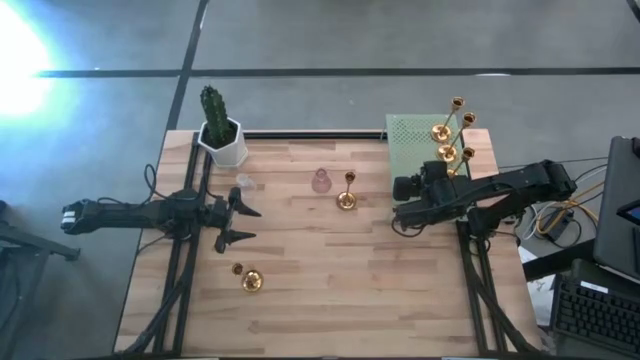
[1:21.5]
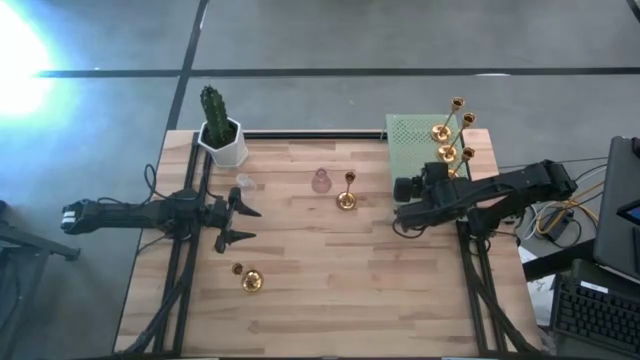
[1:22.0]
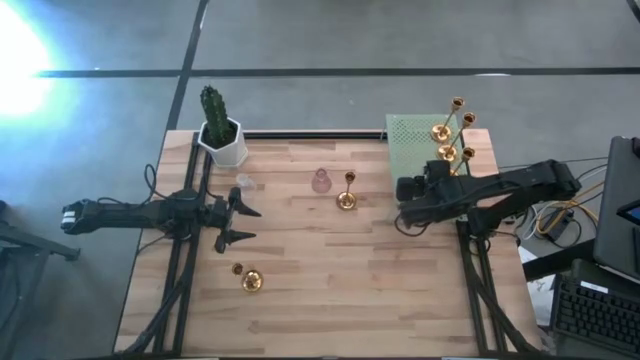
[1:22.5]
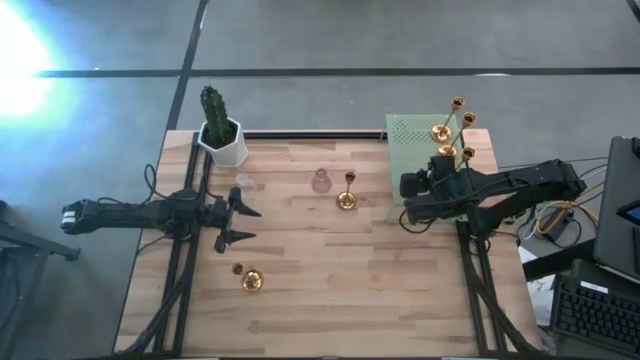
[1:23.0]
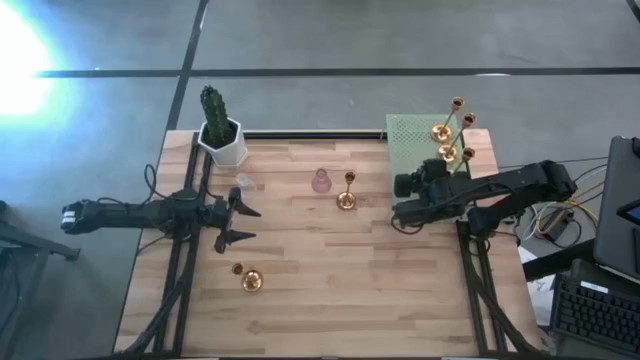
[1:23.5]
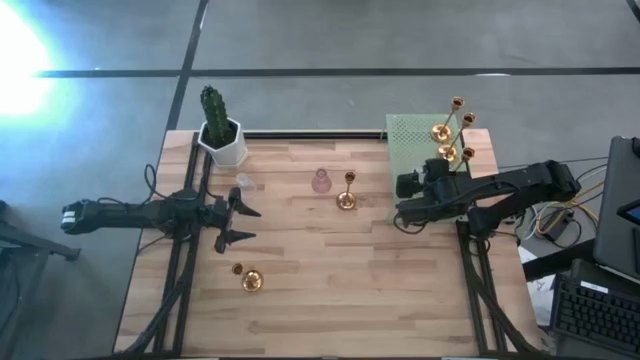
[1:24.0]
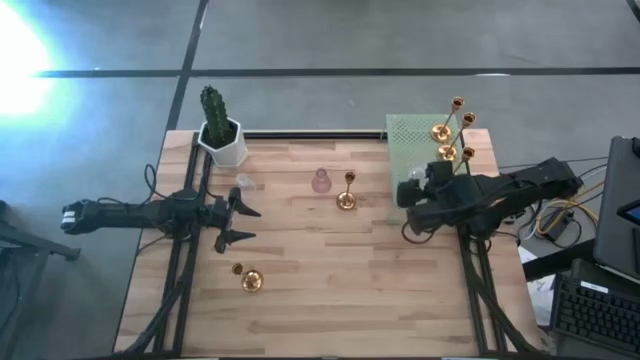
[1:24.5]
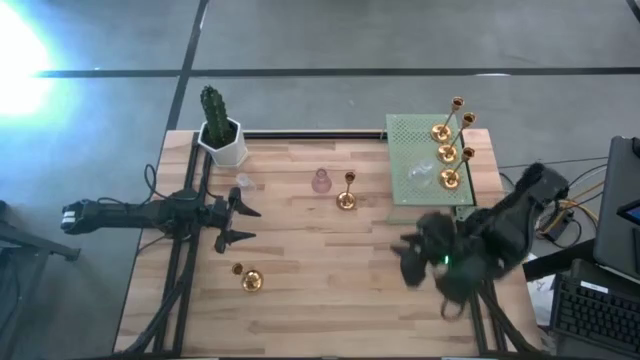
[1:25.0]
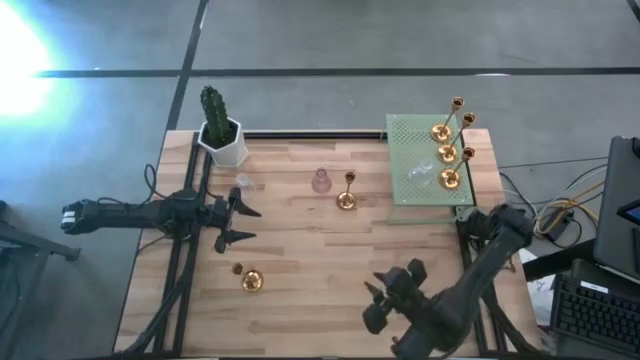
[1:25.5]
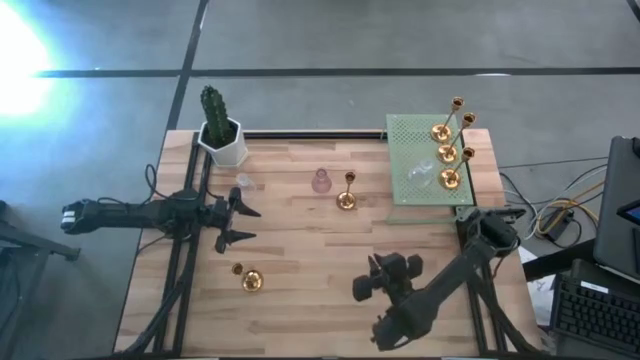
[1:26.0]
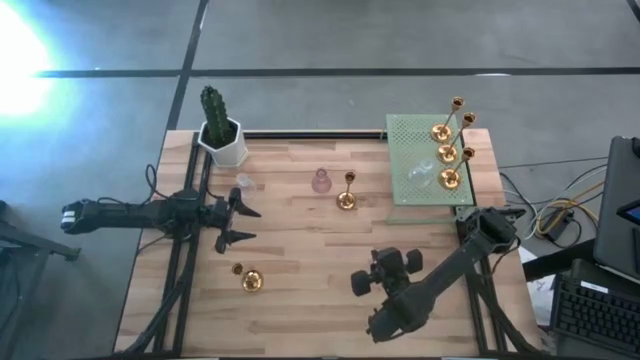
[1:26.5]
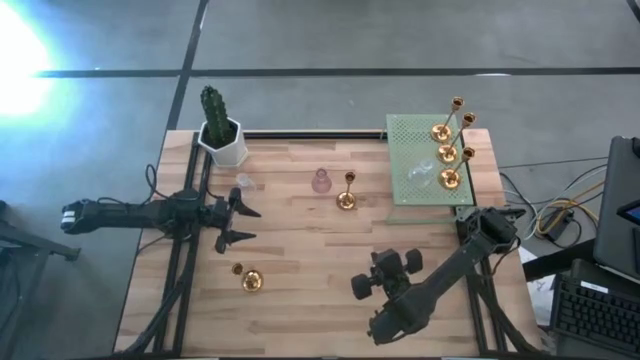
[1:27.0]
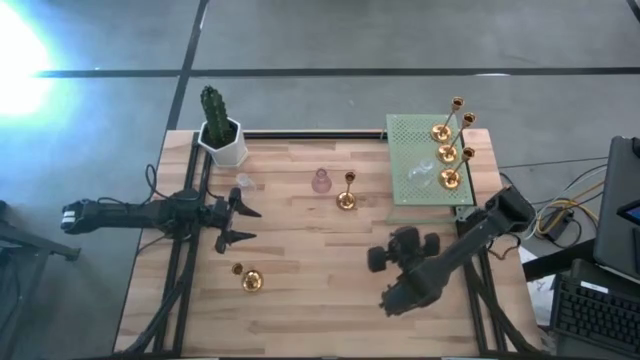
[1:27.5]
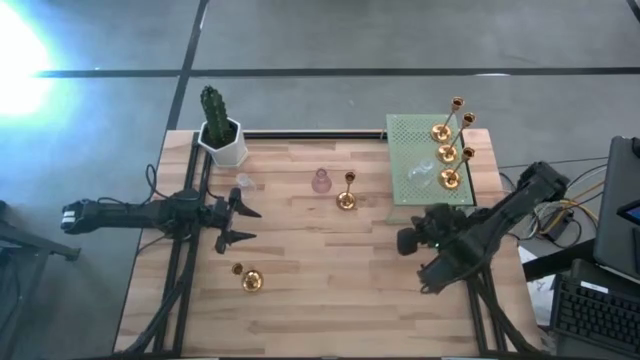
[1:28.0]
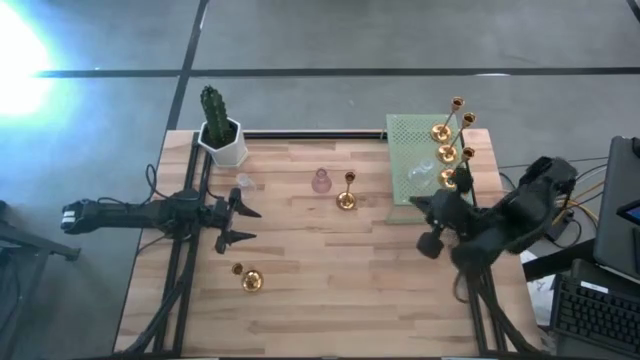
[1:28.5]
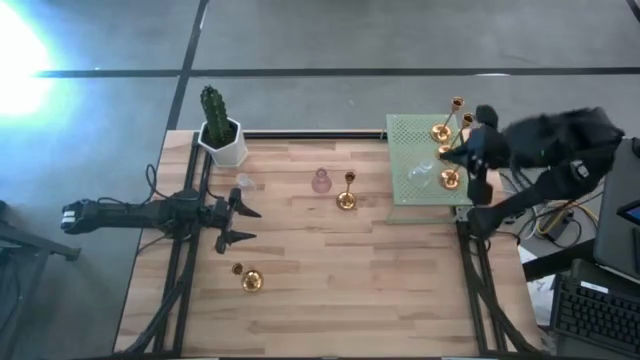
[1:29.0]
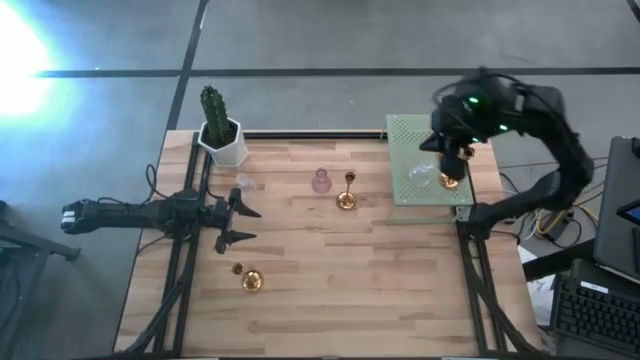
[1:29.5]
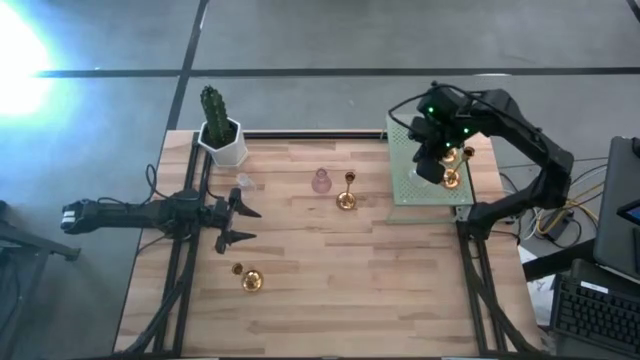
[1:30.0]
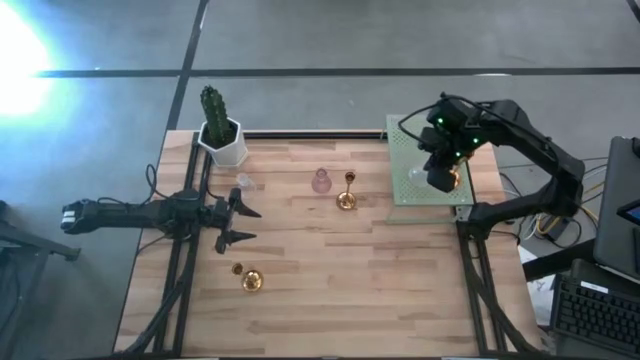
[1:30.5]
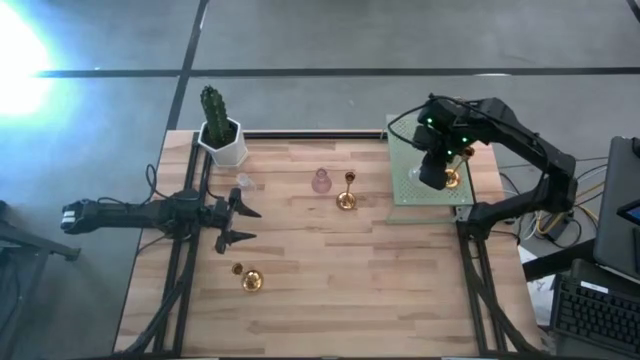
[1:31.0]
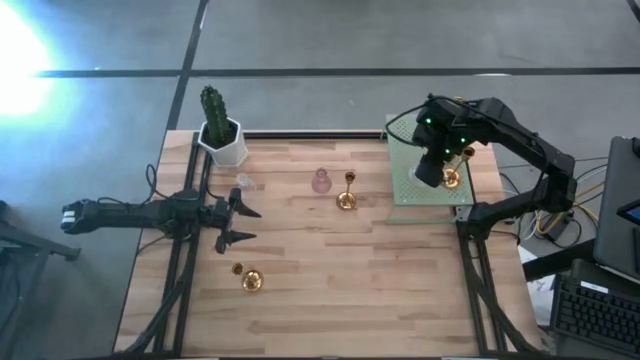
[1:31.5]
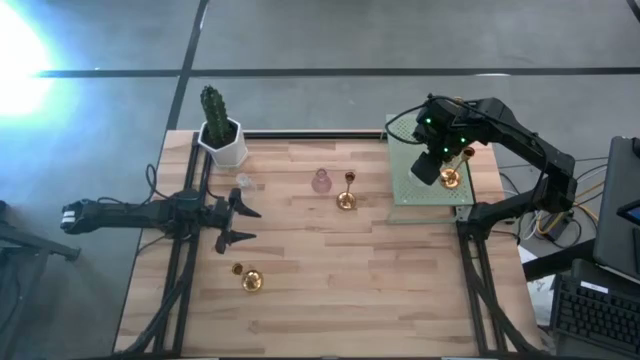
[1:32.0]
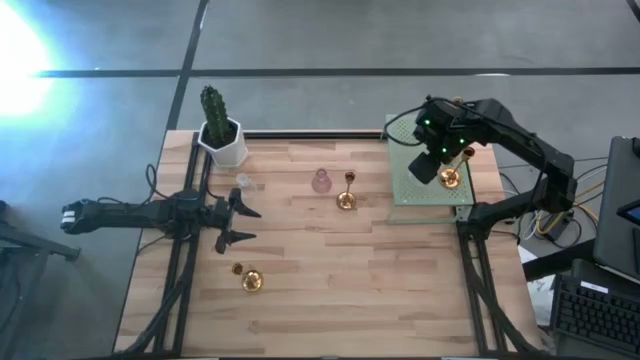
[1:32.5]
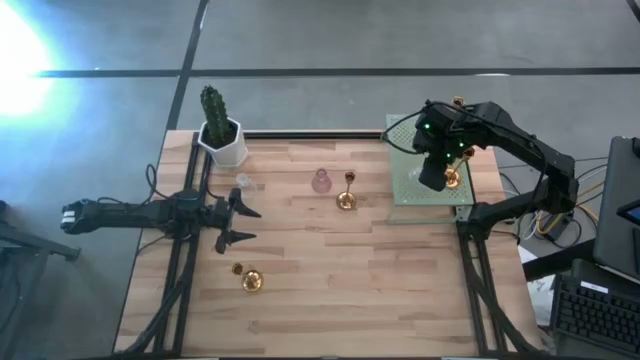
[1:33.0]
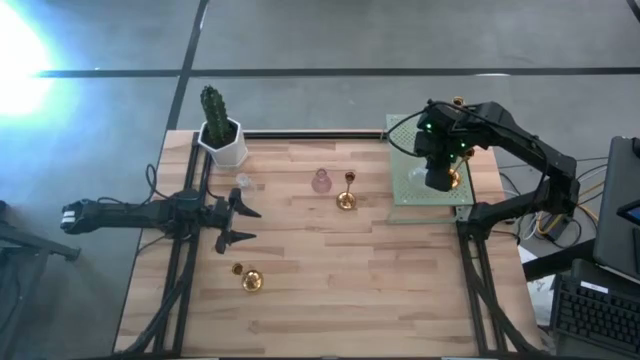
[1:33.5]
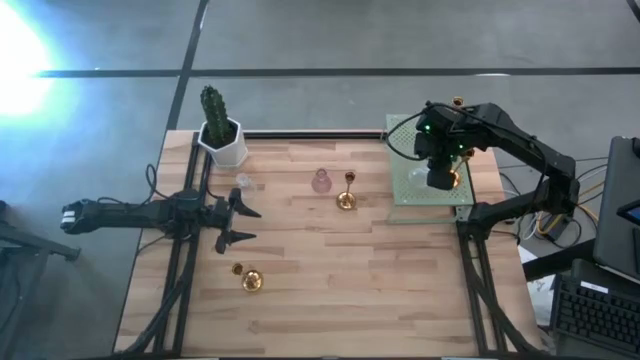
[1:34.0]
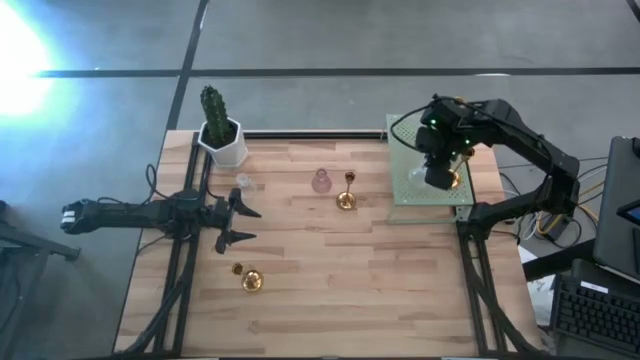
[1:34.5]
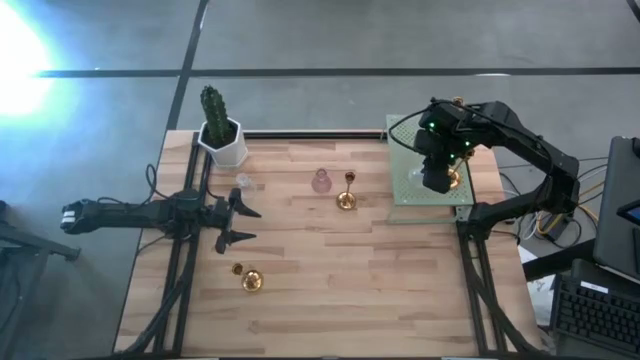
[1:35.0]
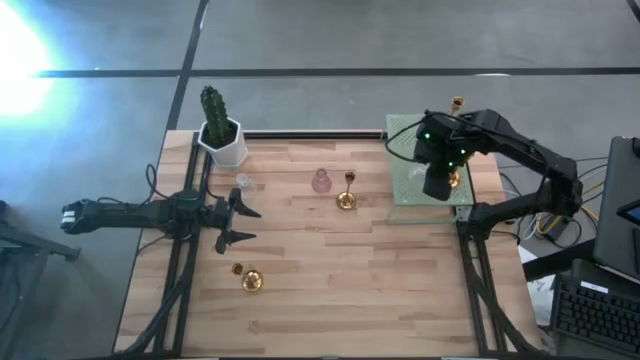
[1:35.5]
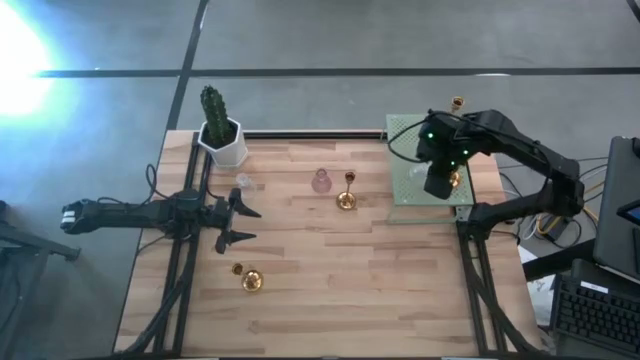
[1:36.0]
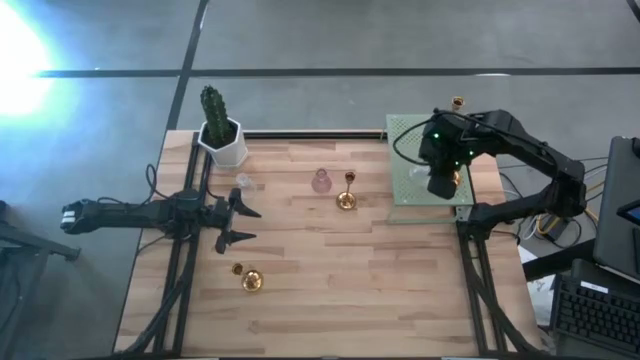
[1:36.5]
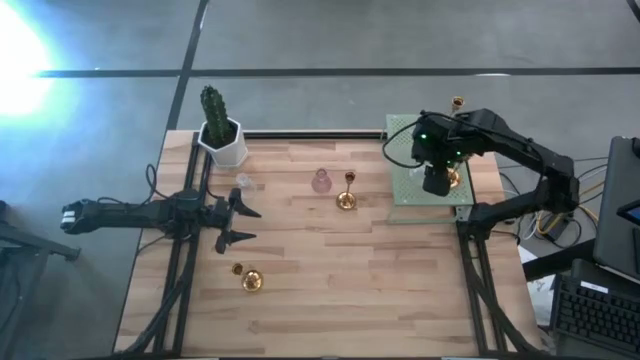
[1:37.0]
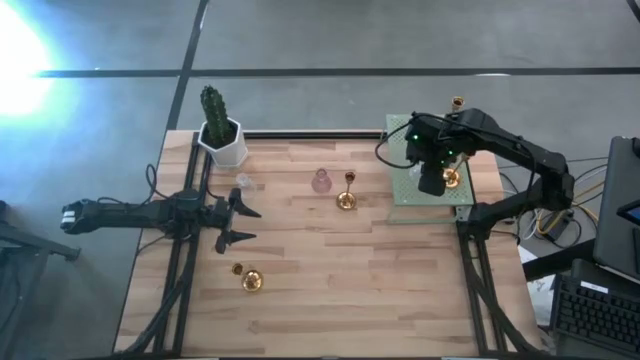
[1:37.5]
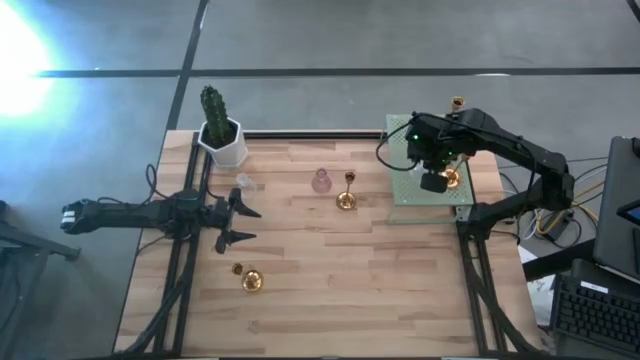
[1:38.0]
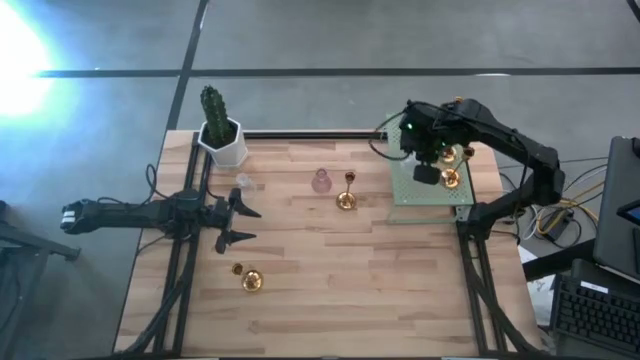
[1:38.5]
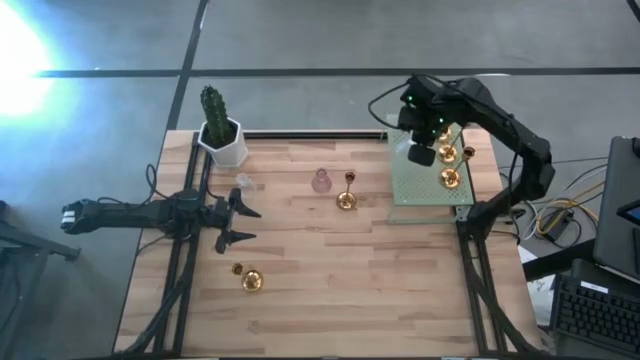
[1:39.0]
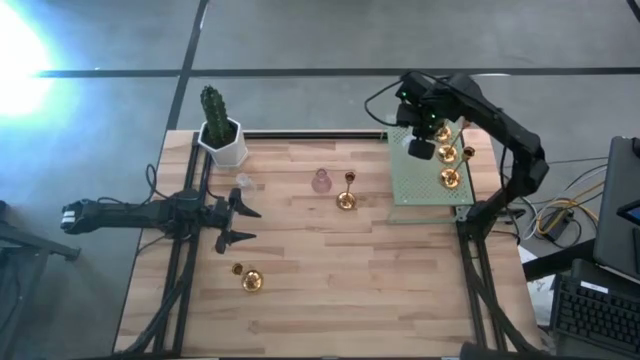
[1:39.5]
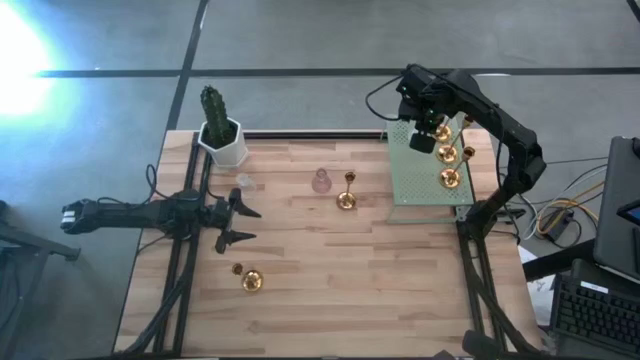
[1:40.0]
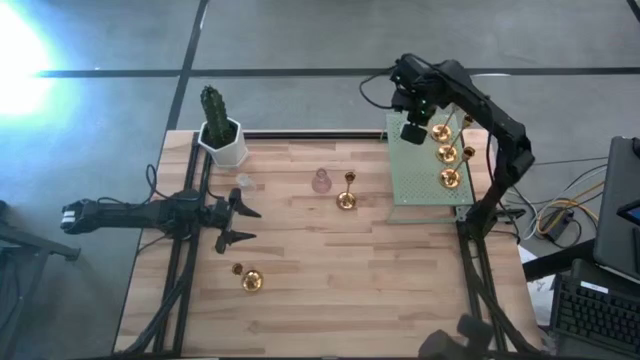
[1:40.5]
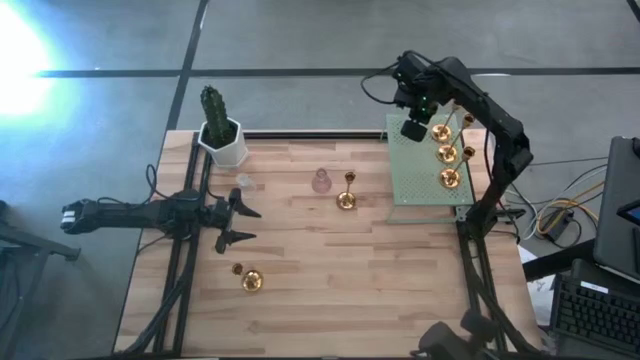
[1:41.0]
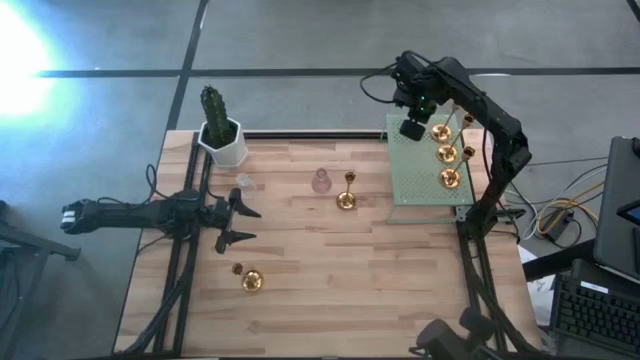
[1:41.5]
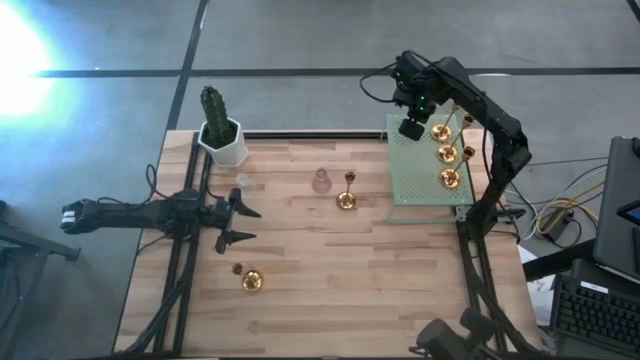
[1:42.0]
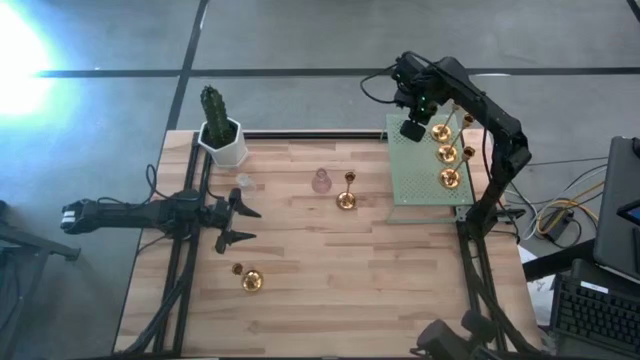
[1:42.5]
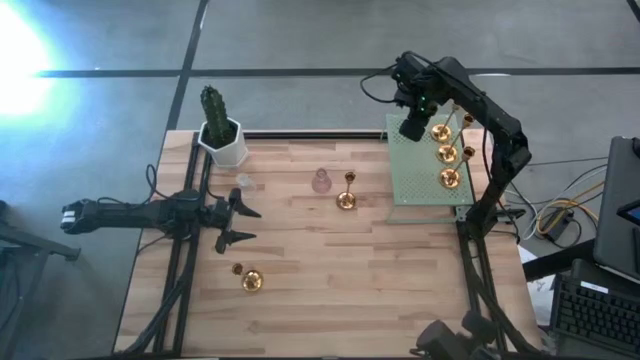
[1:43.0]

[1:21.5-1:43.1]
Task: Pick & Place candle stick holders
Put the bottom transparent glass candle holder on the shelf
